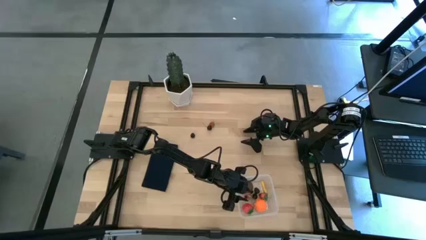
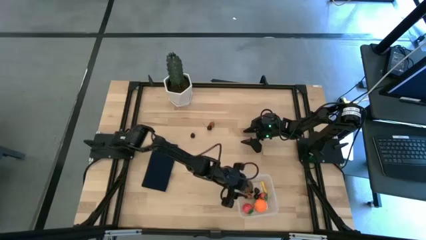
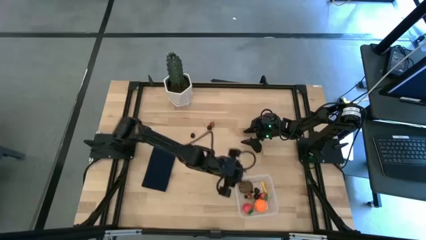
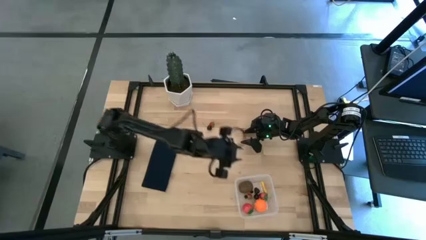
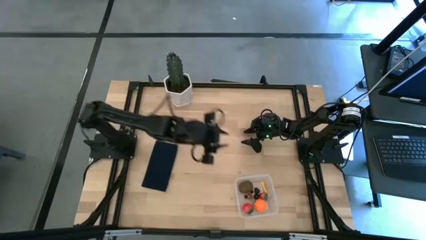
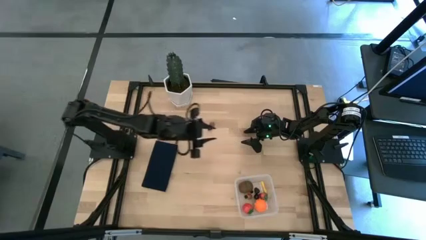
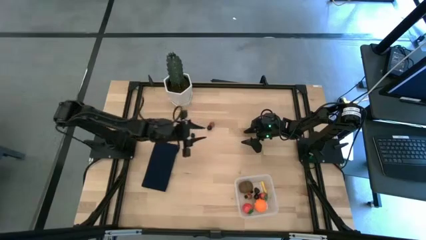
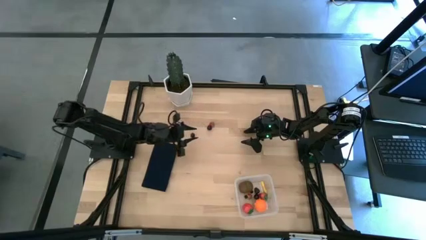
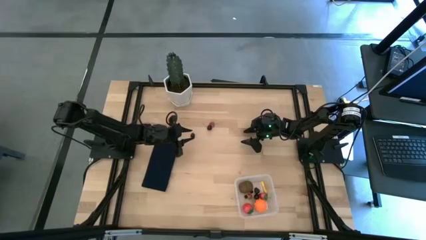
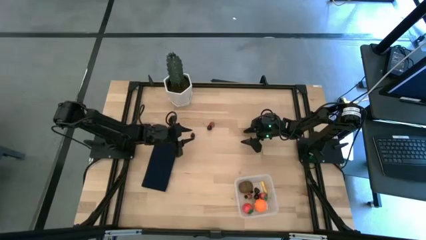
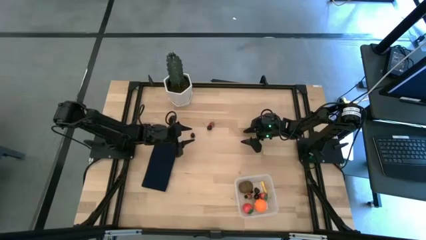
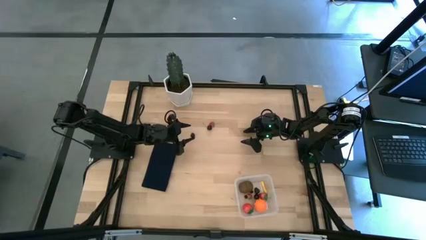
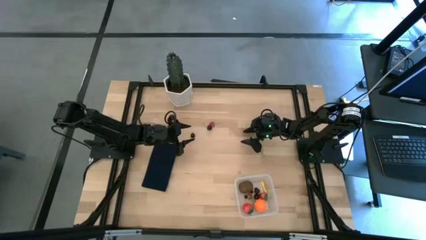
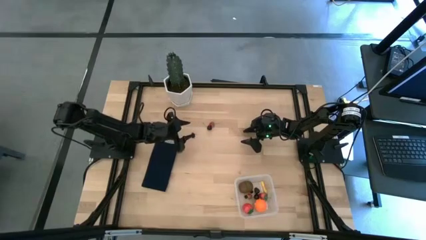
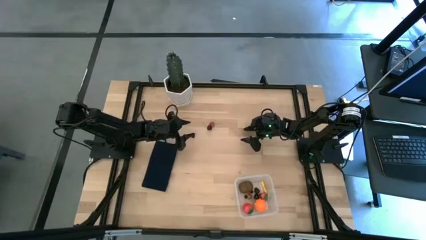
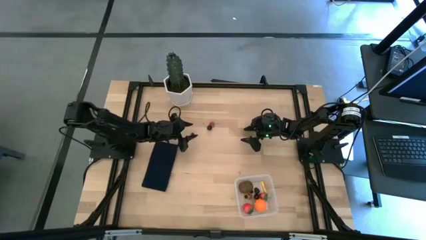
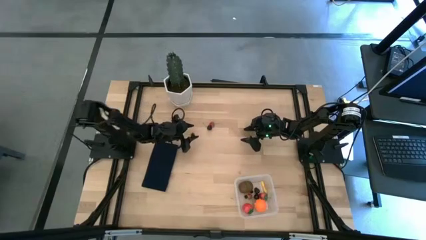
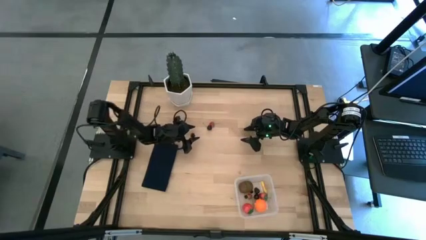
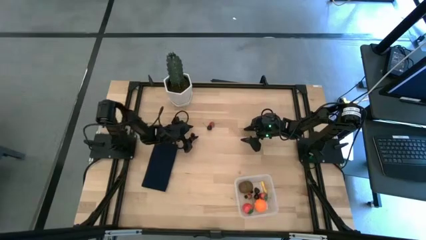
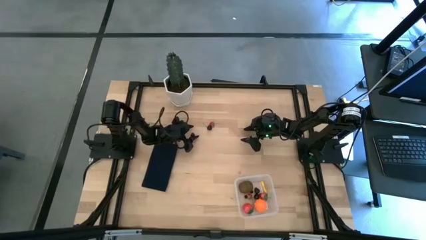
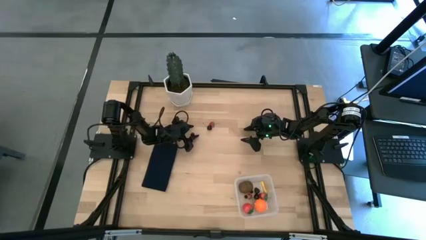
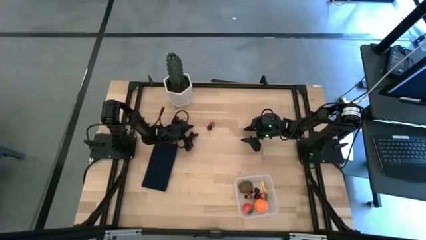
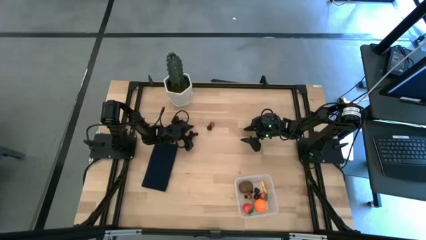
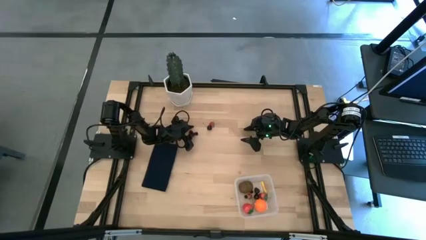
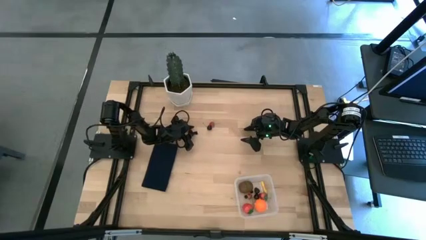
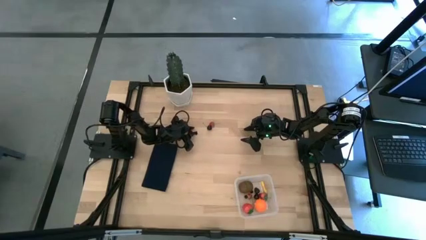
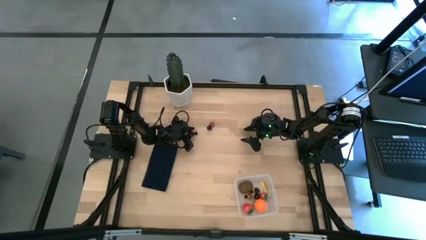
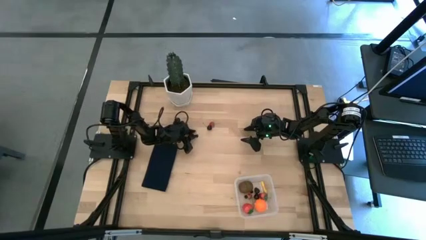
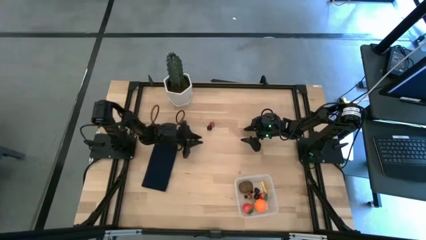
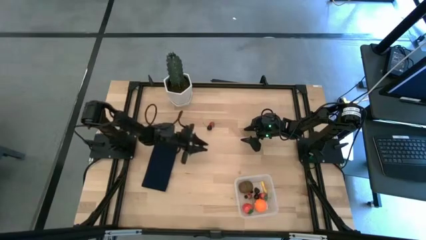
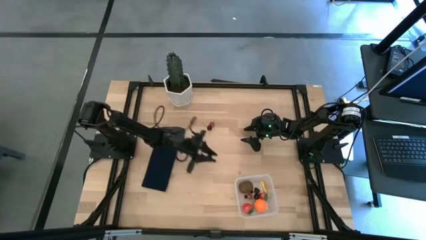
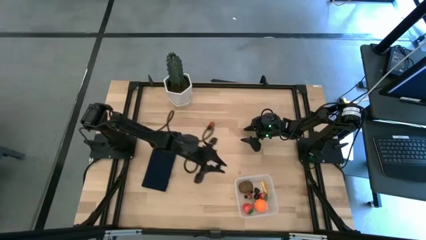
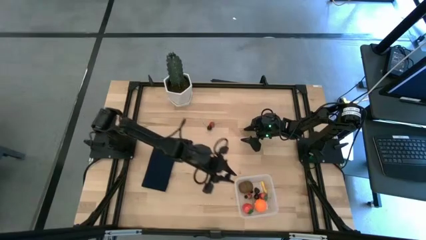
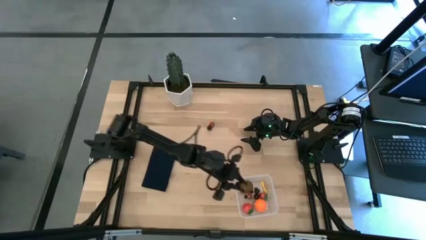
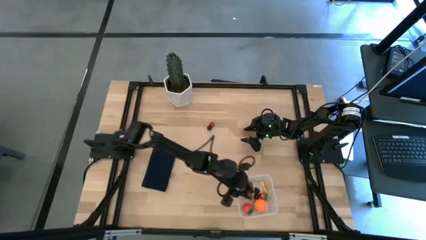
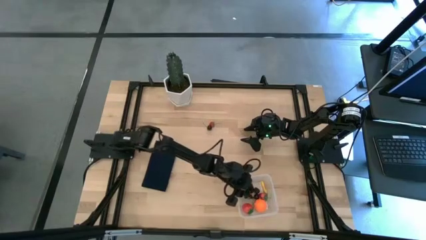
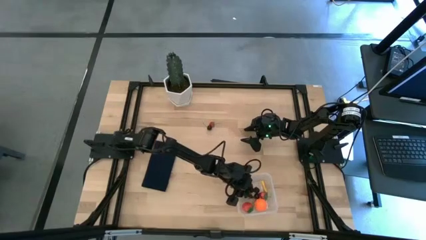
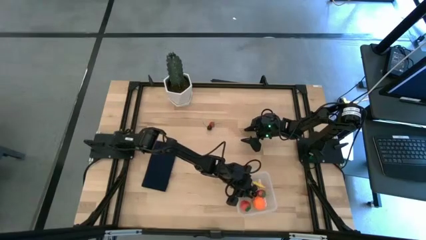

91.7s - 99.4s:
Task: Pick and placing Produce into tupperware
Put the blackberry into the transparent bin

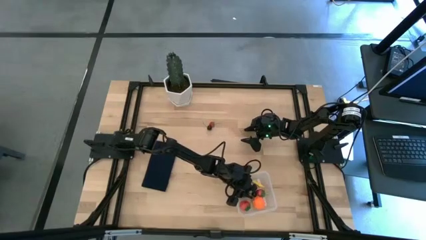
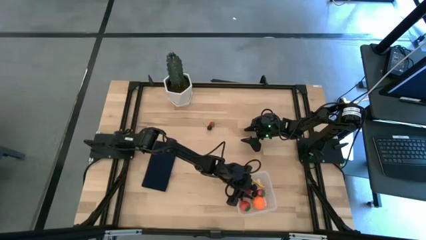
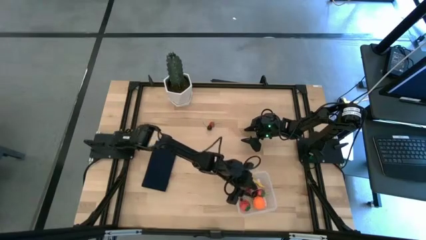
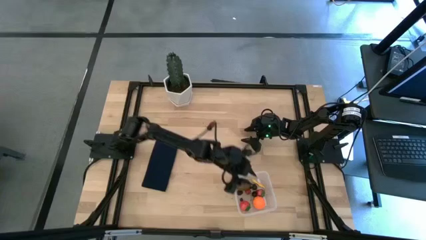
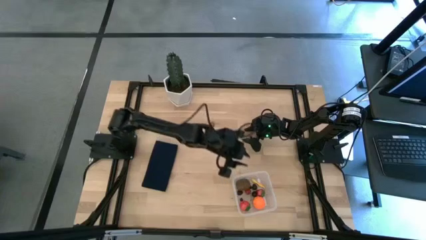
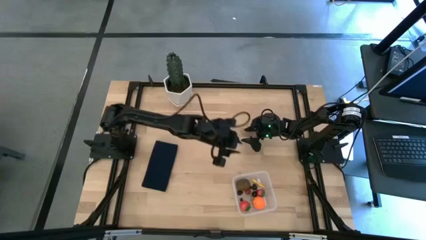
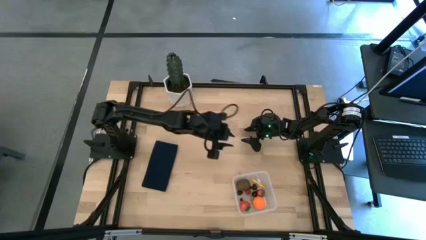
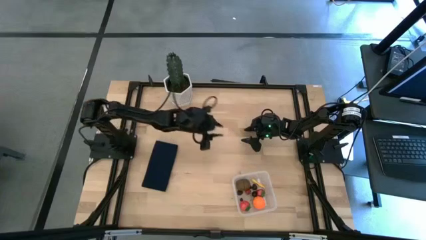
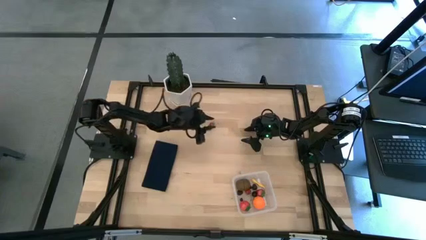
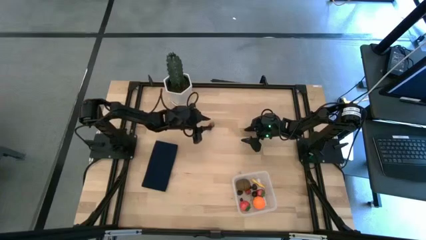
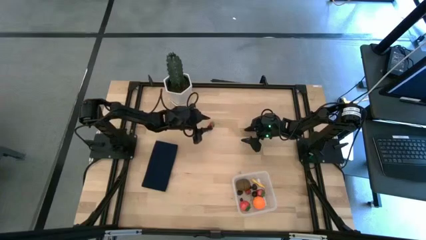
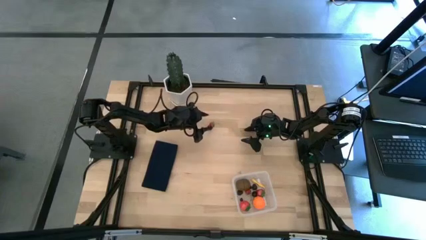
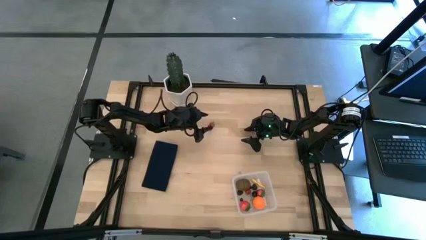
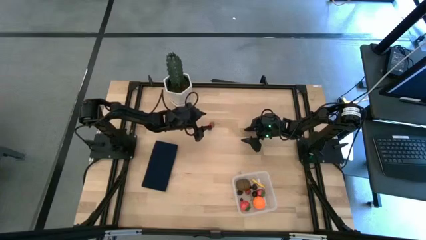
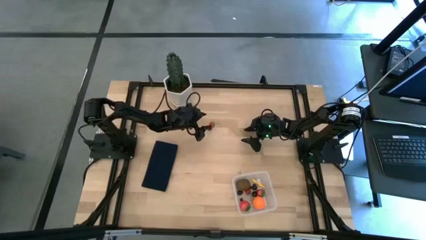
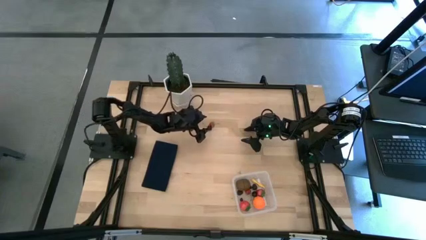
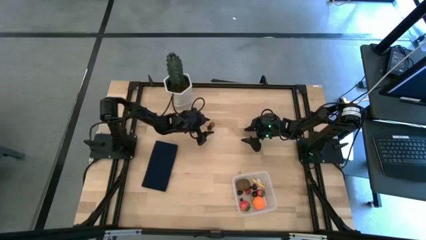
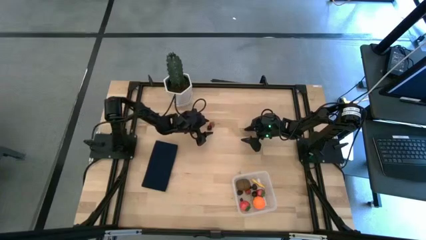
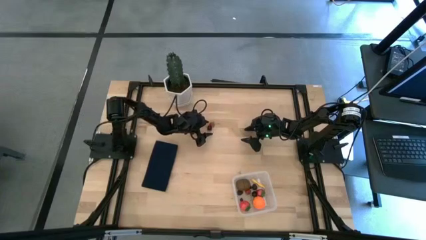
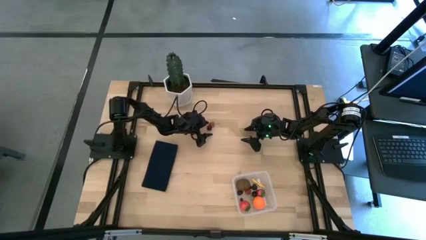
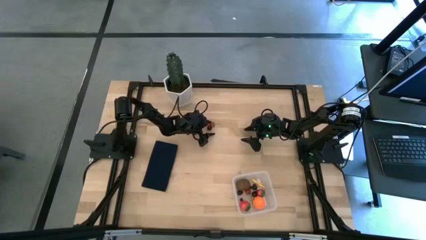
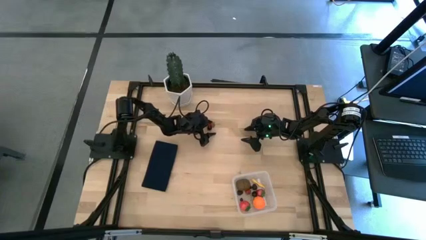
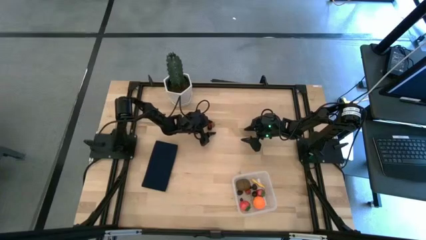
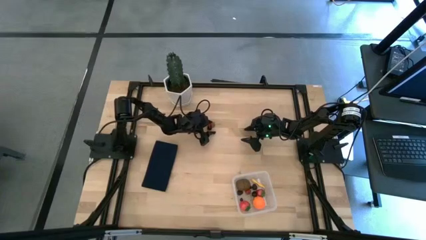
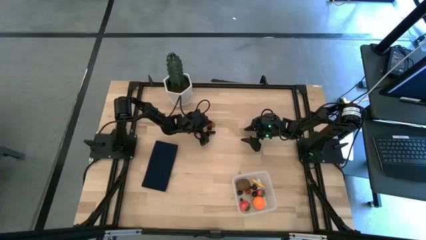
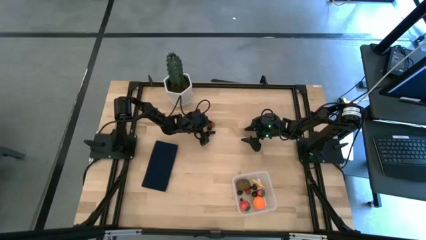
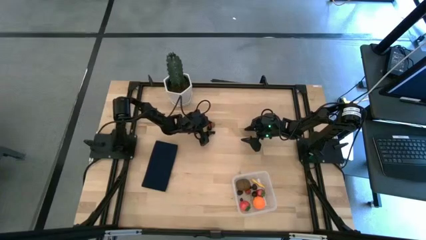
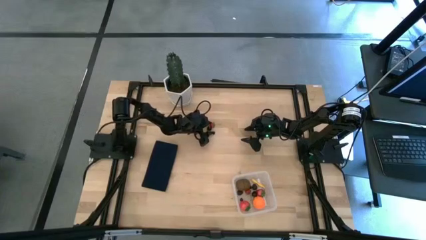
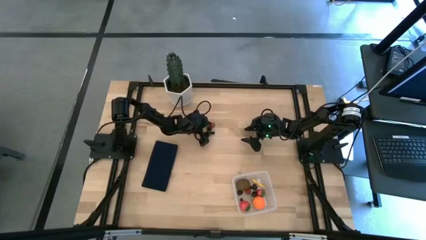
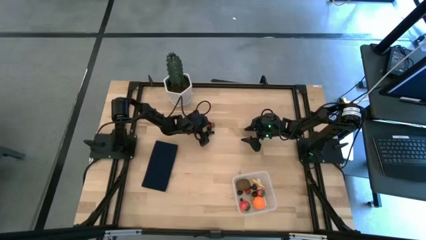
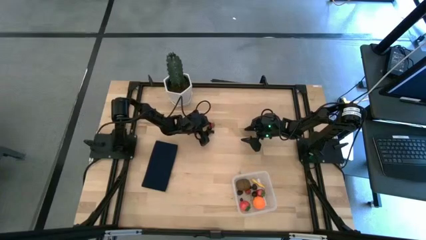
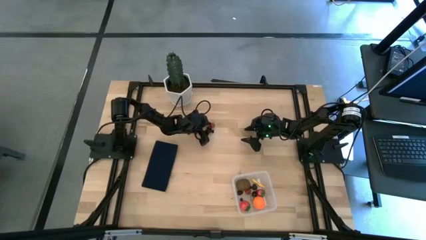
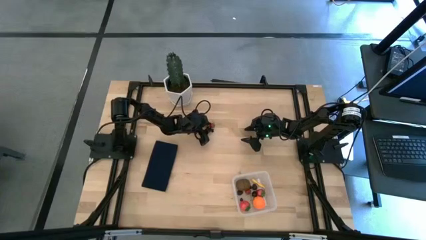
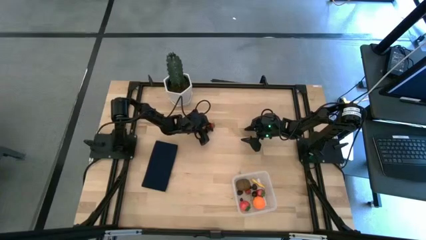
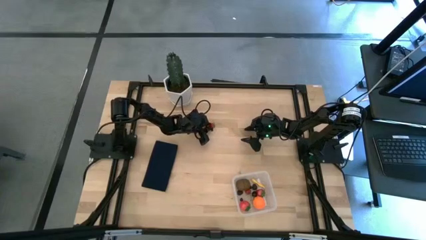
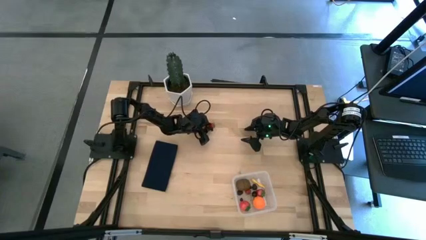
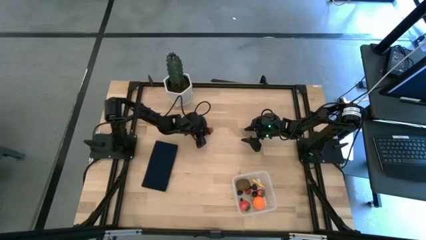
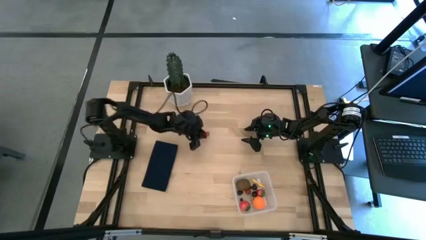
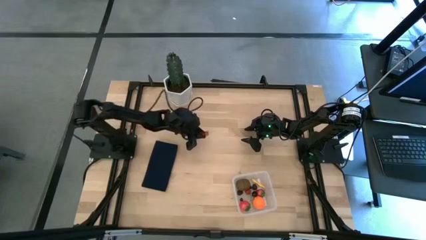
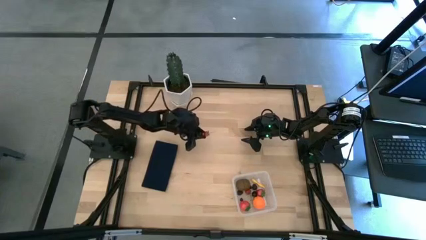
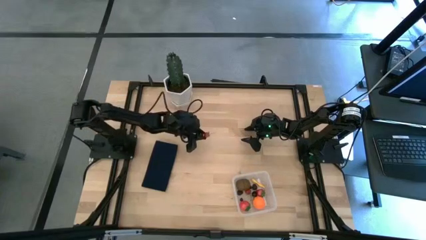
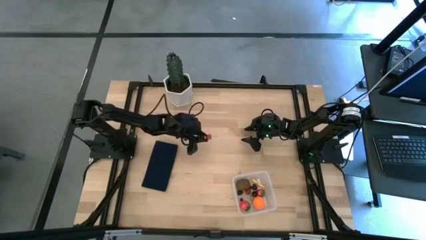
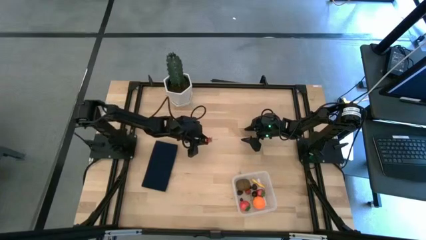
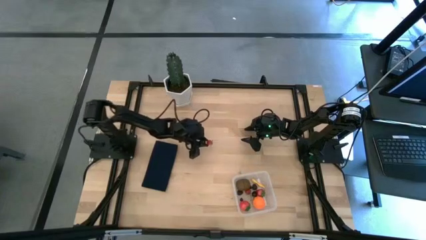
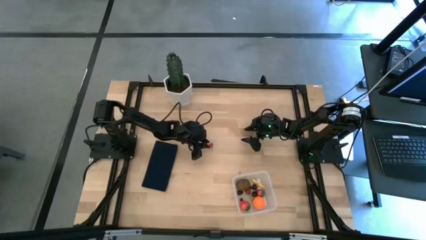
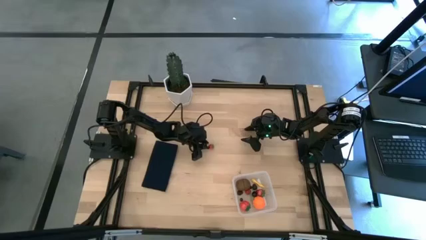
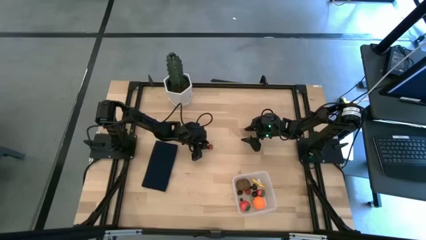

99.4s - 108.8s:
Put the cherry into the transparent bin

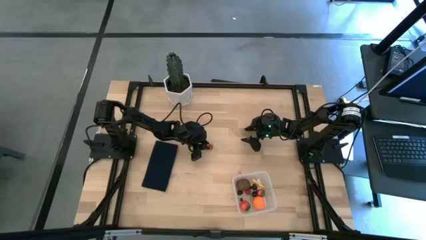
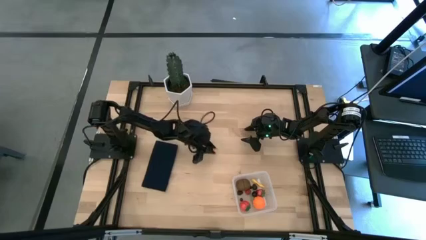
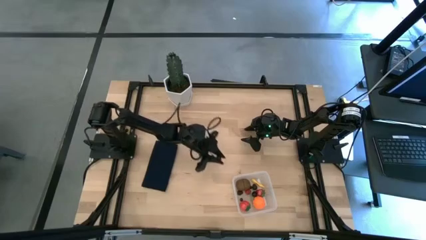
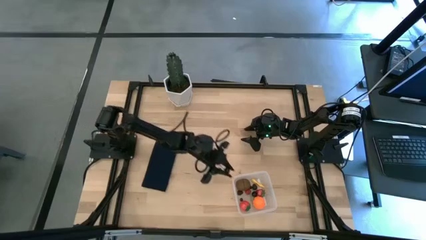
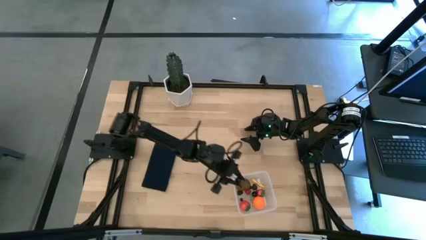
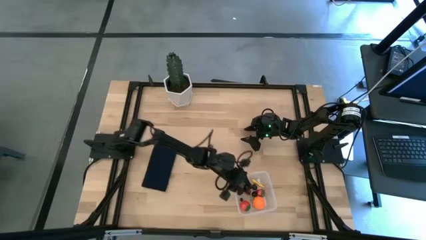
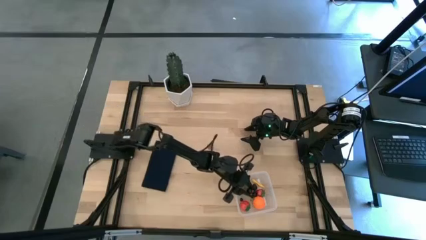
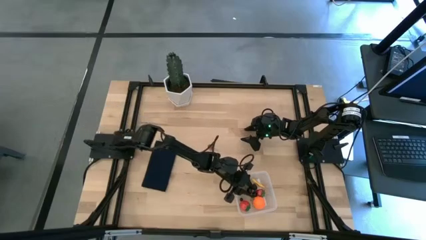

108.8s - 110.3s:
Put the cherry into the transparent bin
